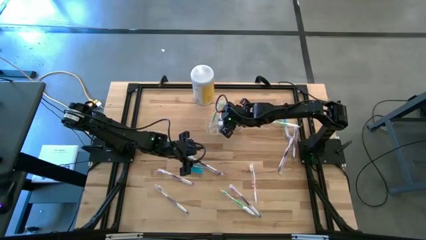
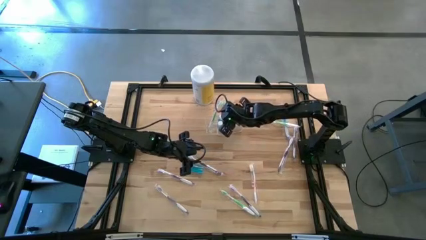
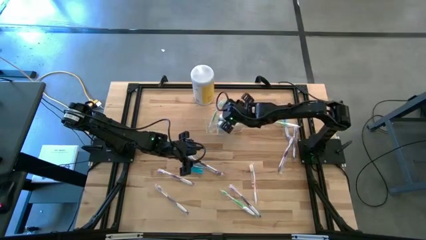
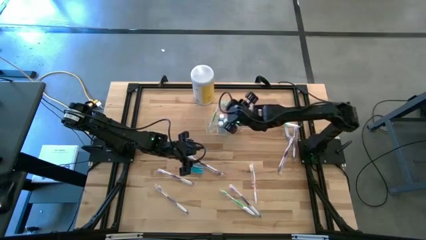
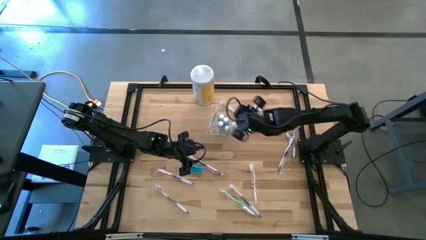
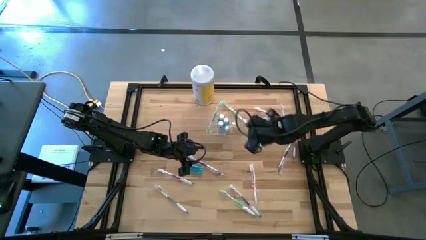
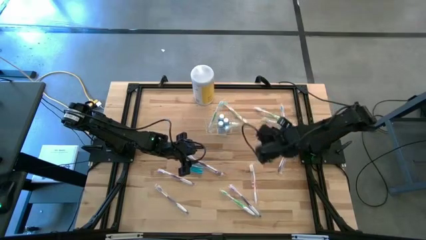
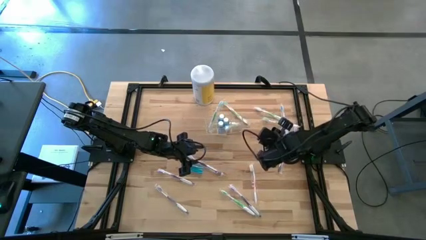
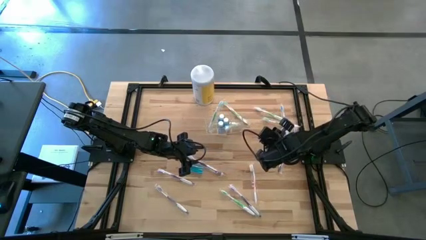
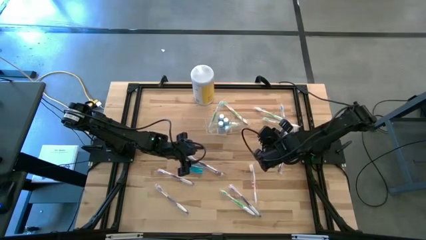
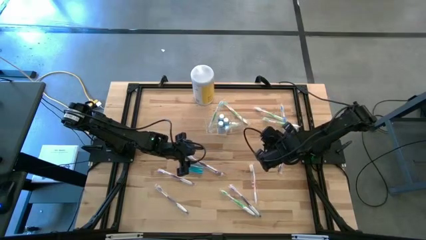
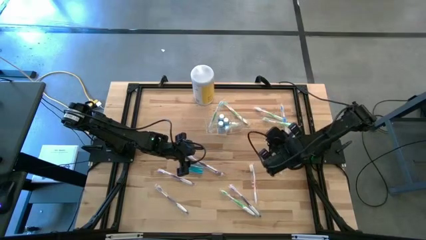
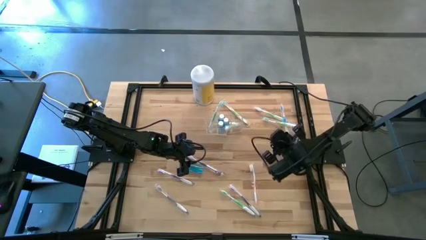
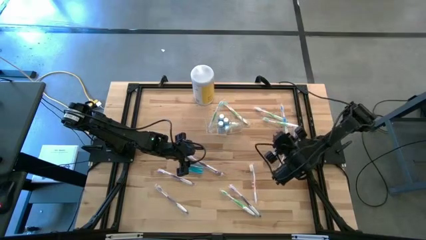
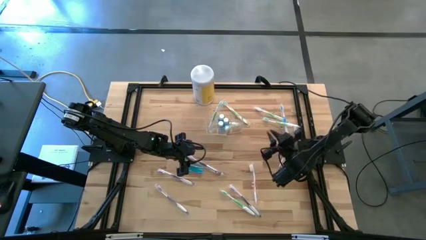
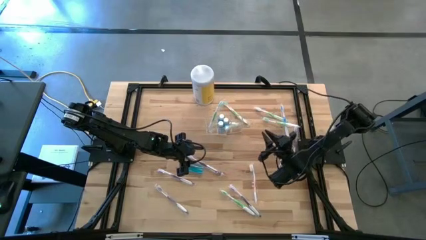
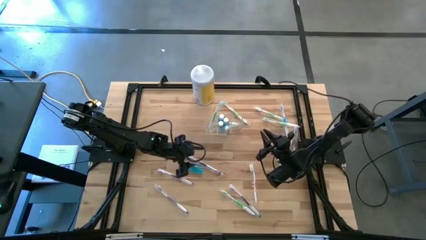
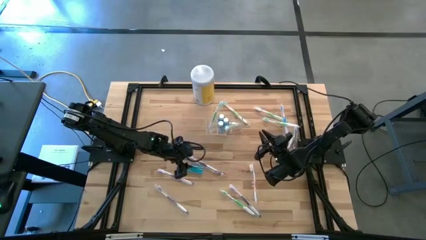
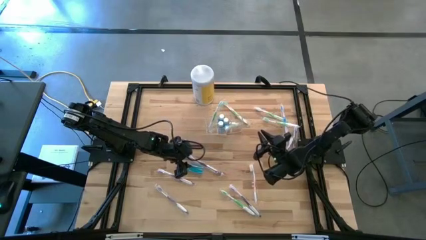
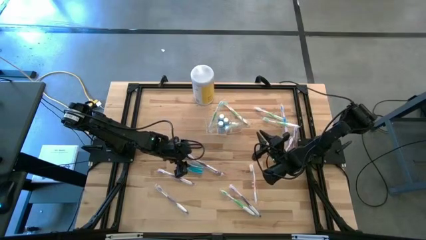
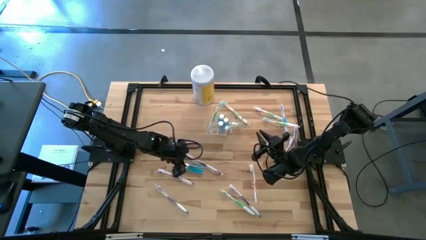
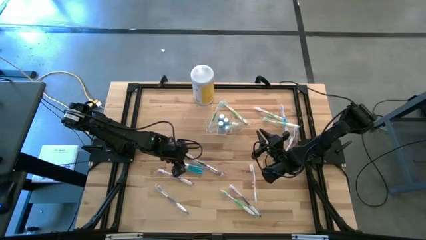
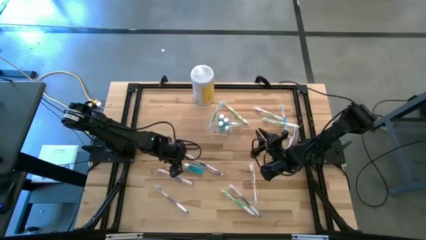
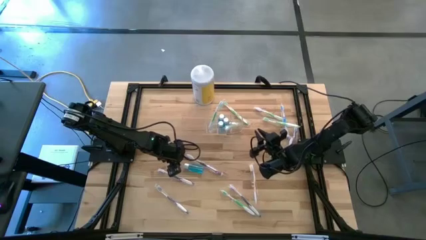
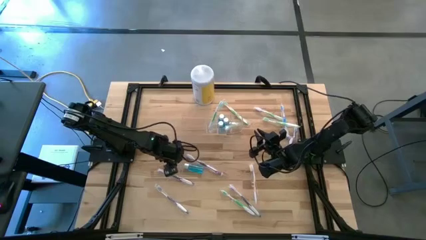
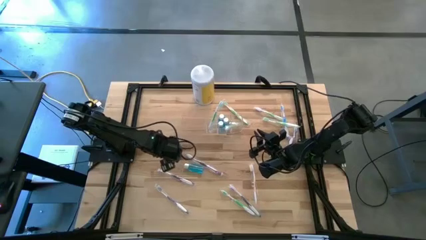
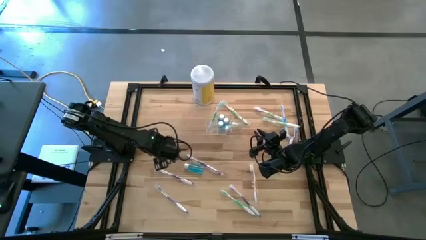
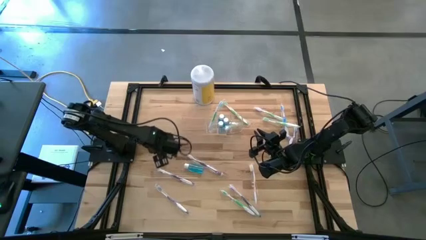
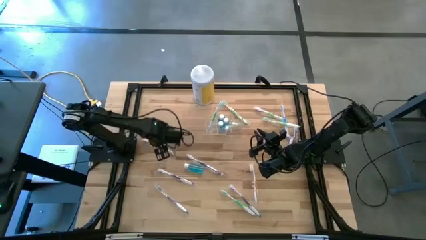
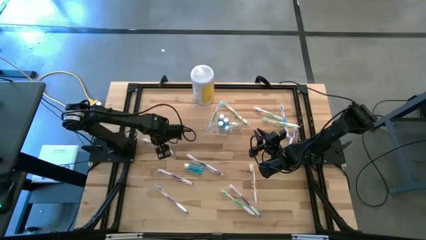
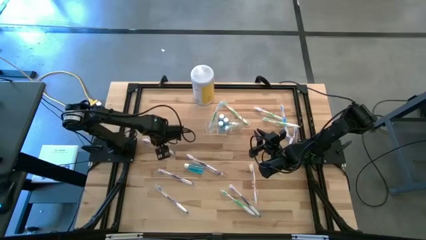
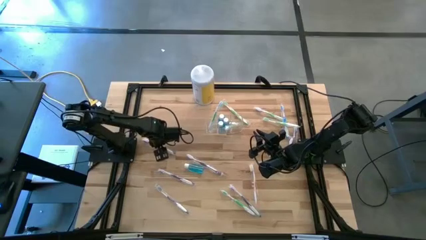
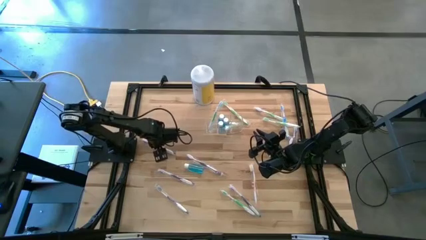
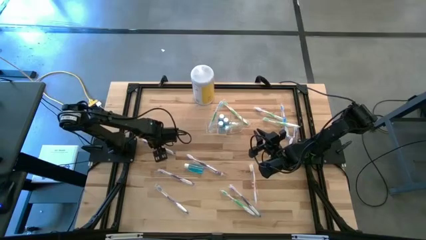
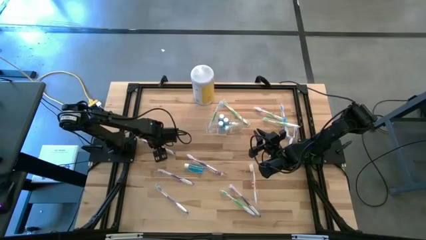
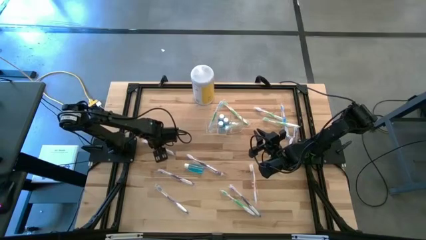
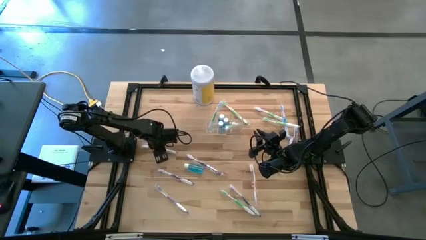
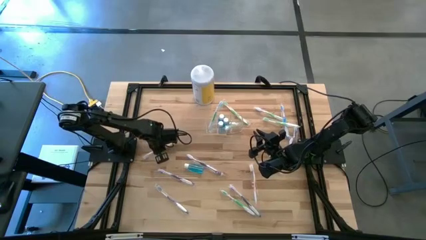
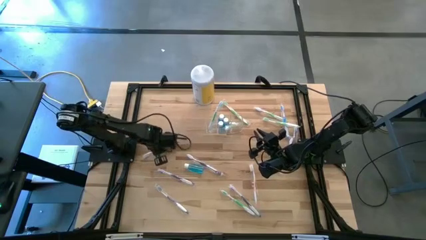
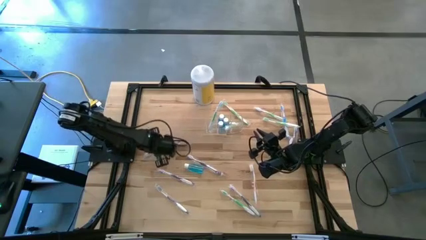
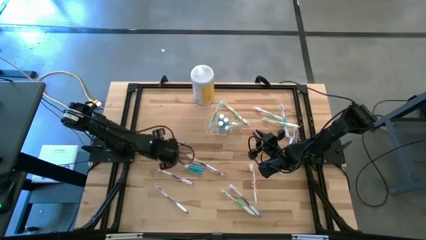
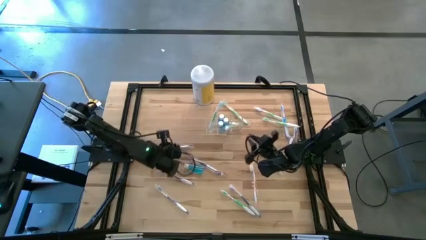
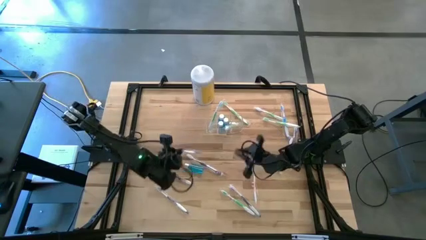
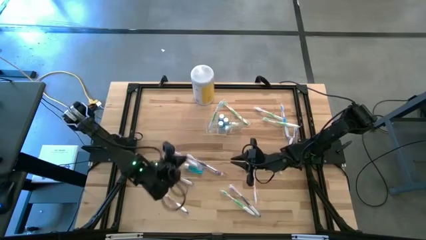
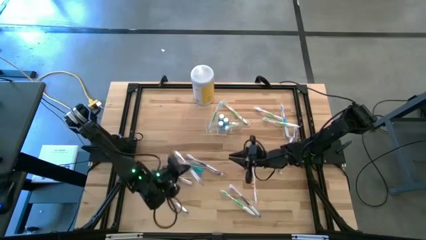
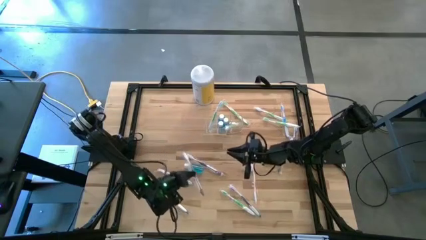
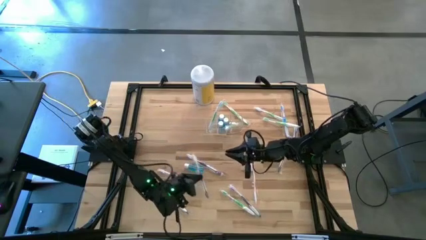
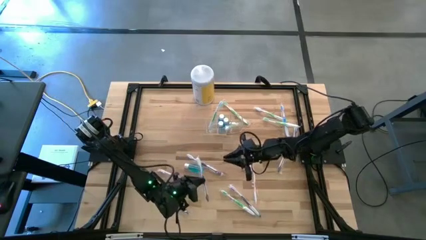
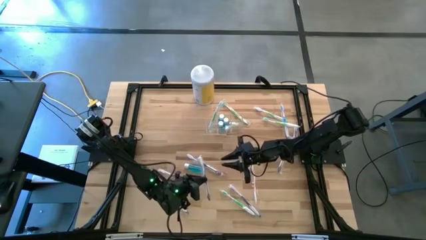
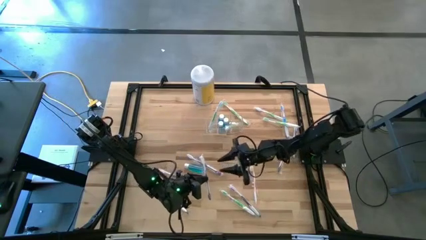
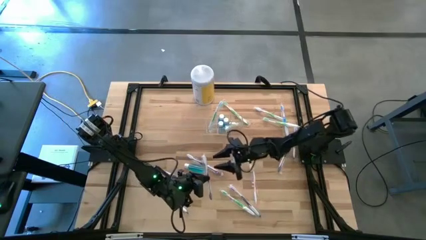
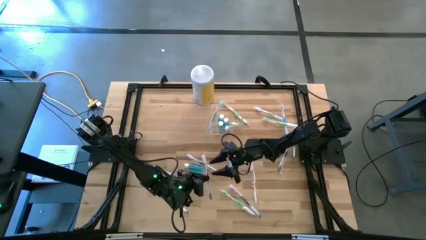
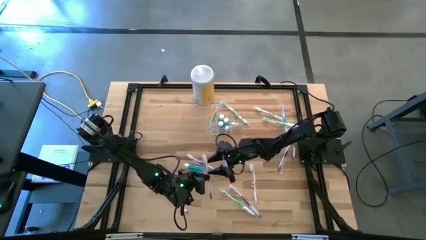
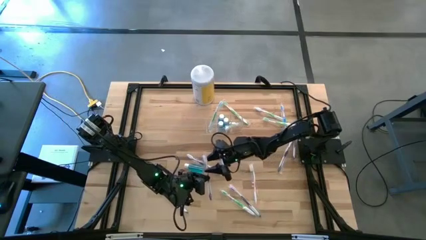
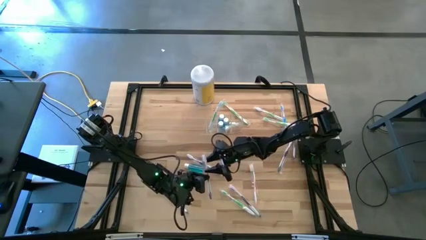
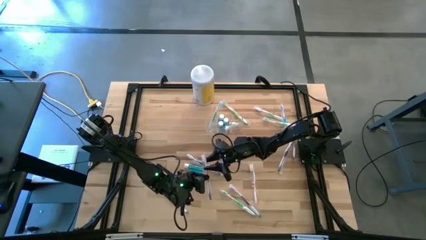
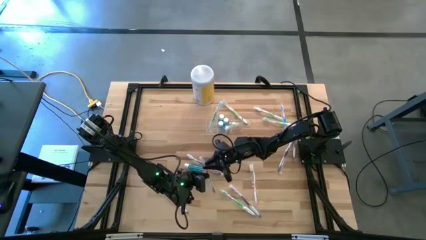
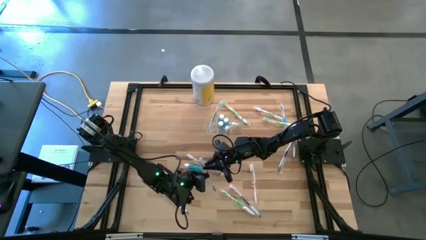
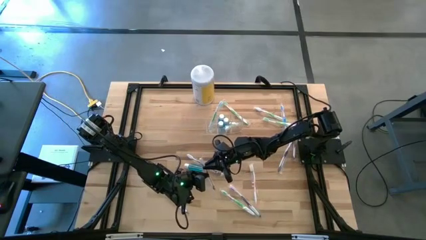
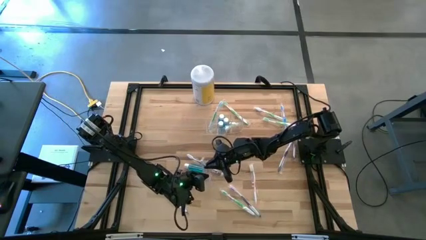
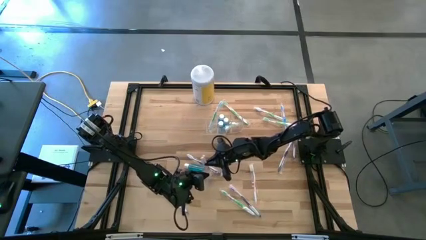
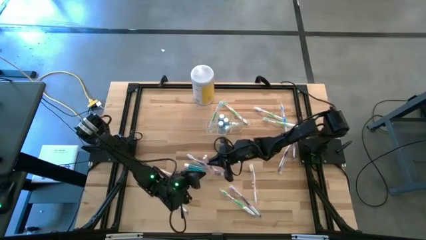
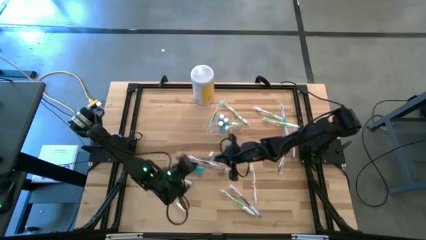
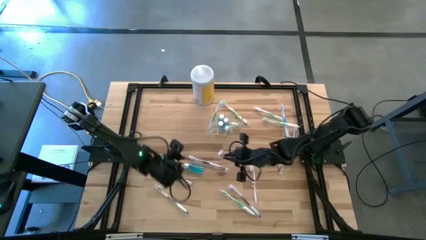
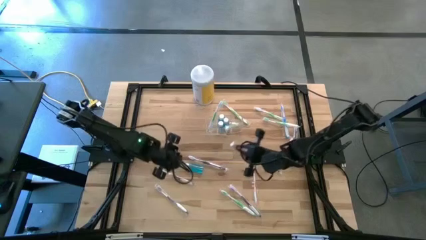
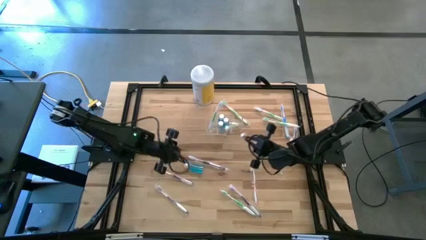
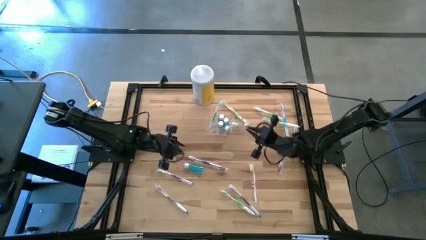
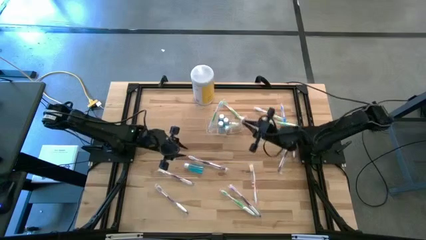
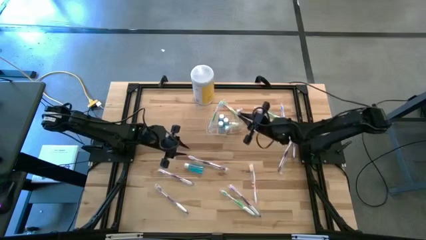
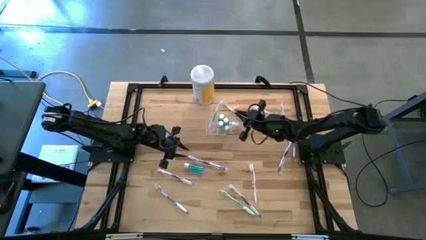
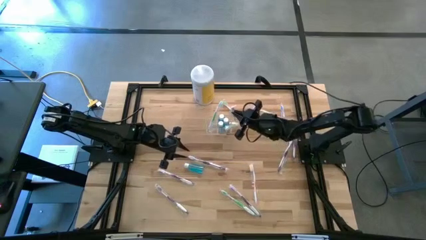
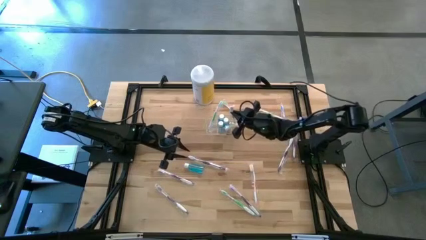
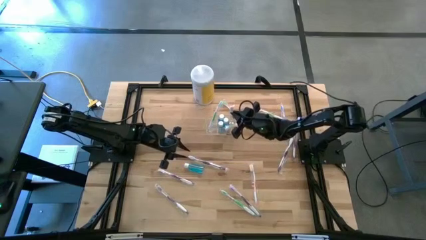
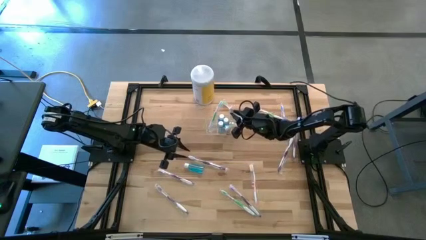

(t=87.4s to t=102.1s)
Task: Pick & Place toothbrushing station
Put the purple toothbrush into the transparent organizer
